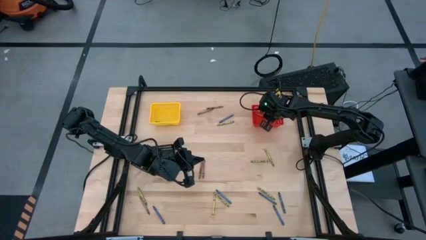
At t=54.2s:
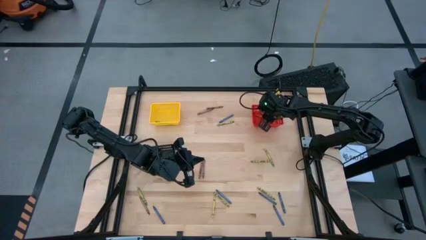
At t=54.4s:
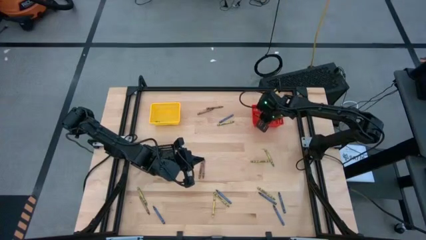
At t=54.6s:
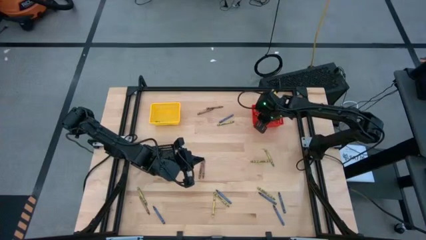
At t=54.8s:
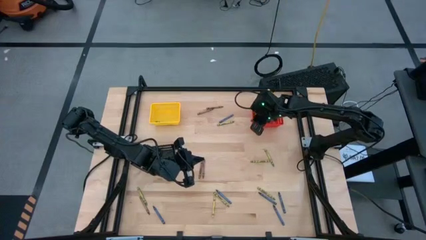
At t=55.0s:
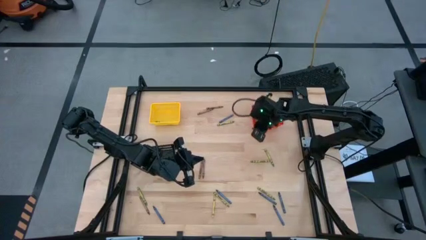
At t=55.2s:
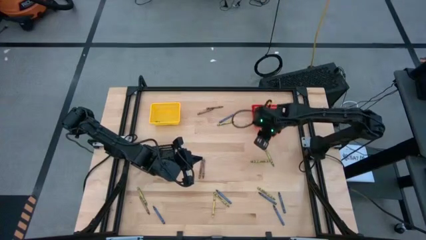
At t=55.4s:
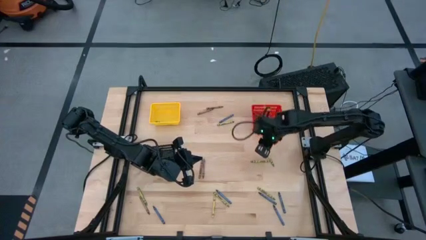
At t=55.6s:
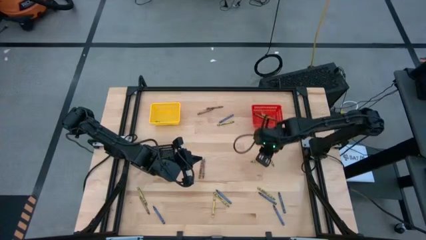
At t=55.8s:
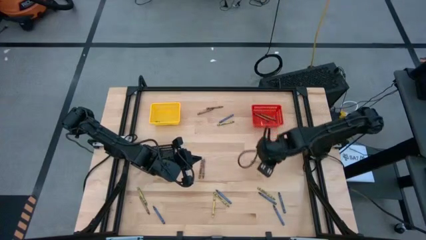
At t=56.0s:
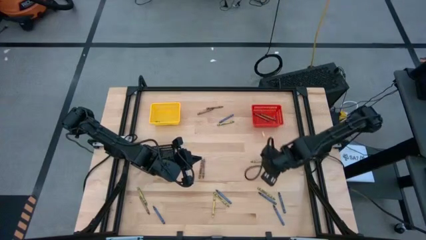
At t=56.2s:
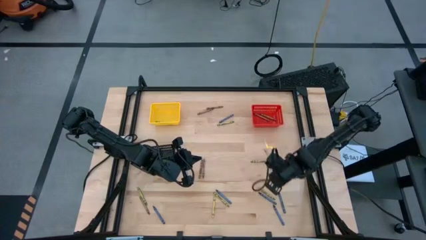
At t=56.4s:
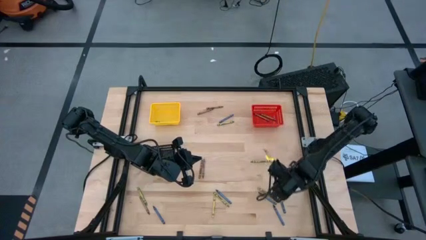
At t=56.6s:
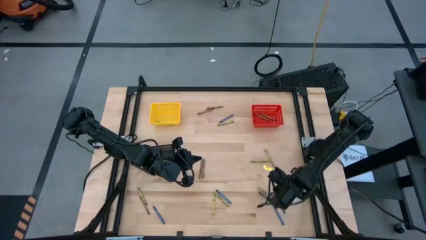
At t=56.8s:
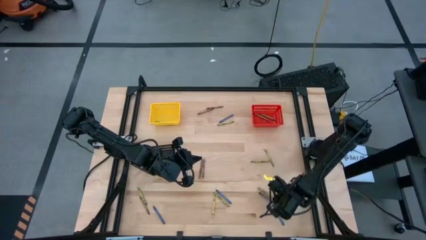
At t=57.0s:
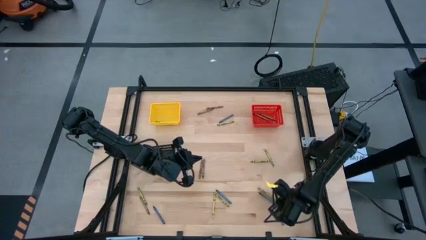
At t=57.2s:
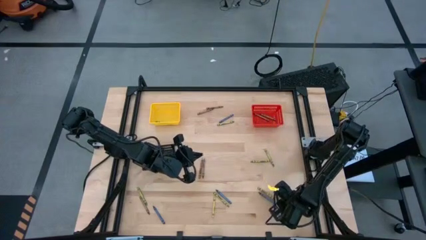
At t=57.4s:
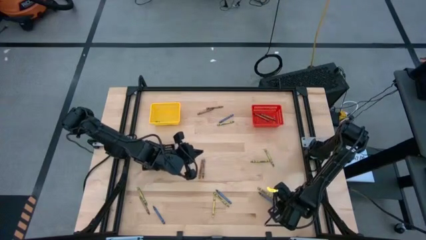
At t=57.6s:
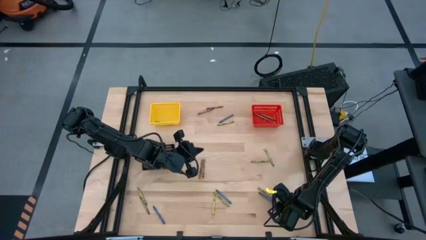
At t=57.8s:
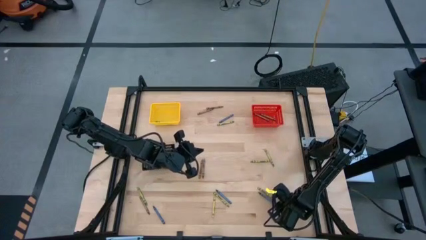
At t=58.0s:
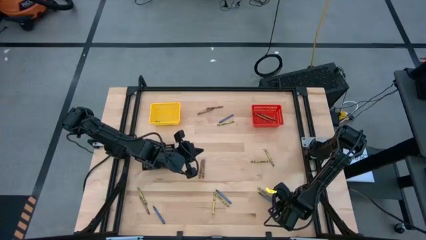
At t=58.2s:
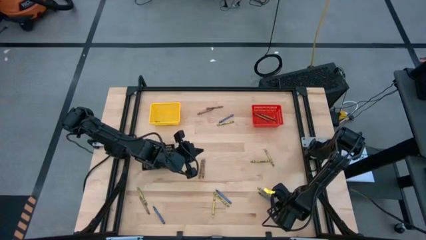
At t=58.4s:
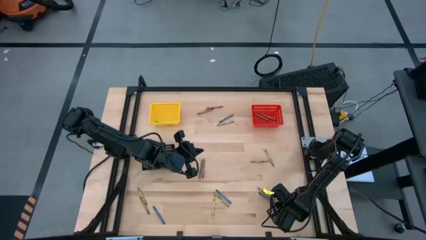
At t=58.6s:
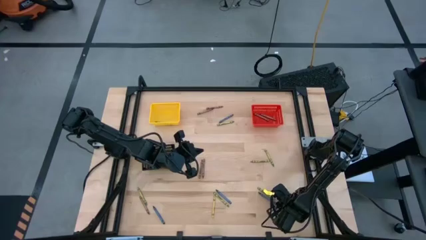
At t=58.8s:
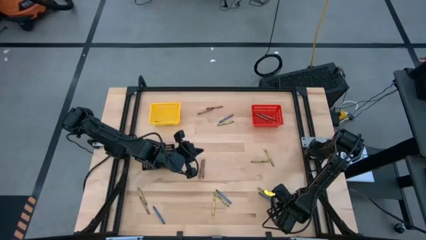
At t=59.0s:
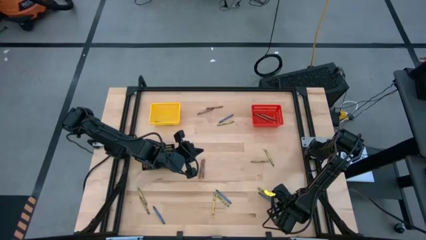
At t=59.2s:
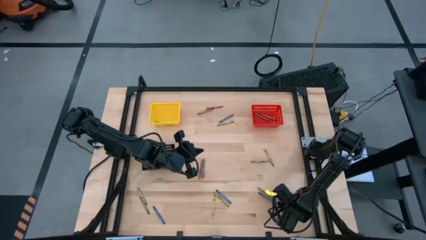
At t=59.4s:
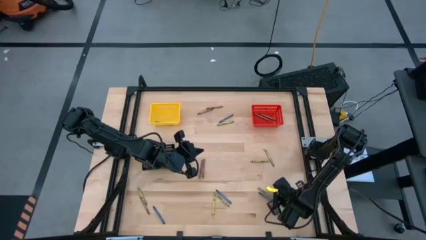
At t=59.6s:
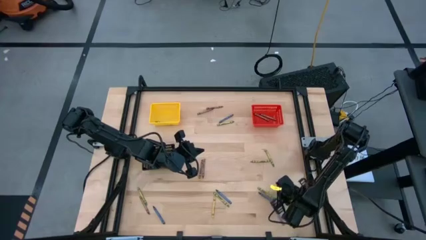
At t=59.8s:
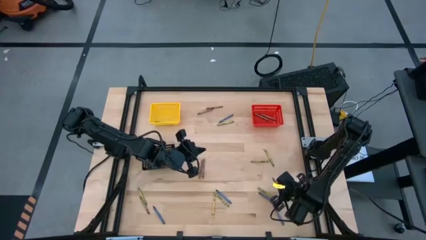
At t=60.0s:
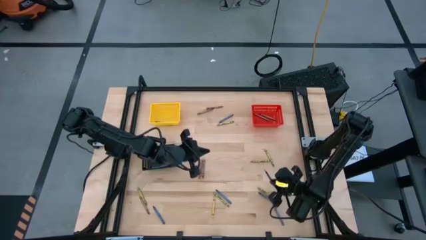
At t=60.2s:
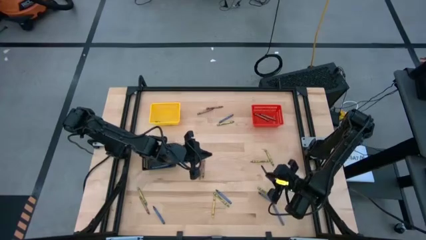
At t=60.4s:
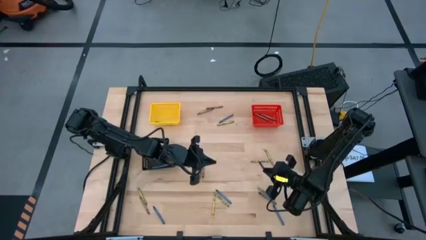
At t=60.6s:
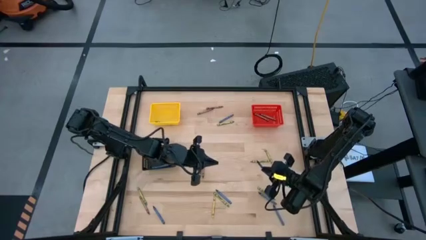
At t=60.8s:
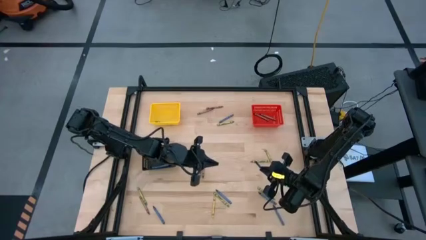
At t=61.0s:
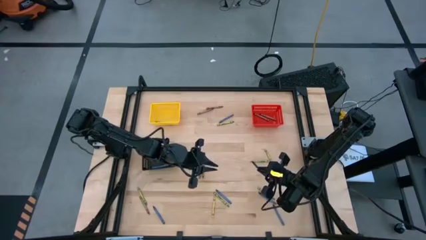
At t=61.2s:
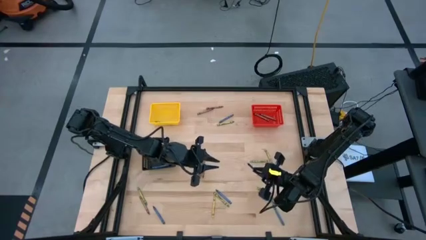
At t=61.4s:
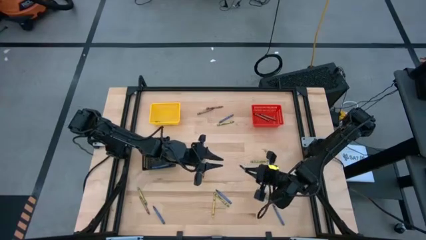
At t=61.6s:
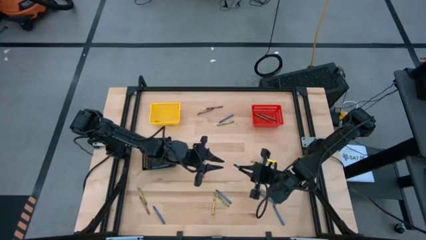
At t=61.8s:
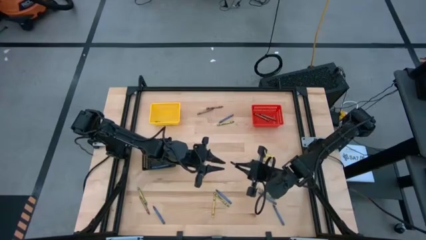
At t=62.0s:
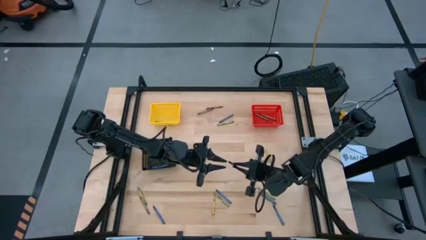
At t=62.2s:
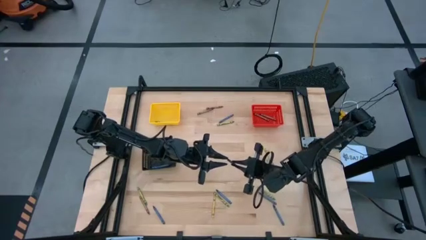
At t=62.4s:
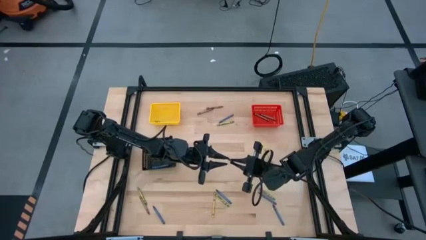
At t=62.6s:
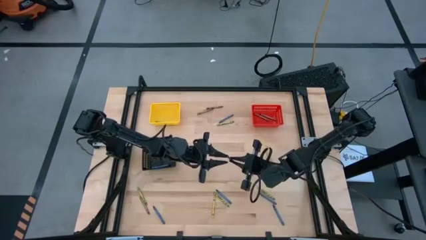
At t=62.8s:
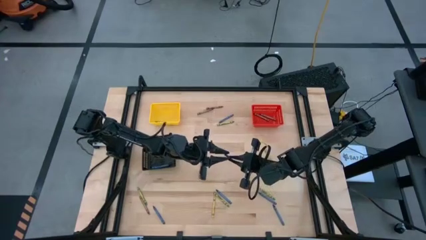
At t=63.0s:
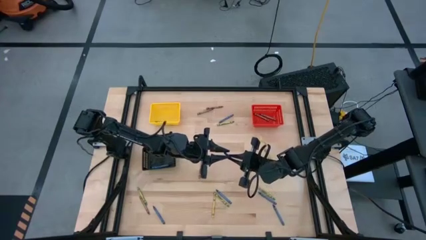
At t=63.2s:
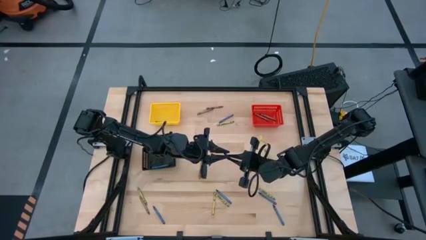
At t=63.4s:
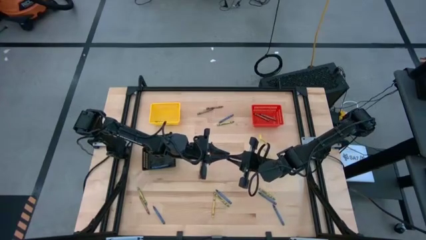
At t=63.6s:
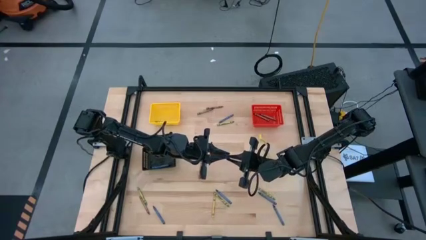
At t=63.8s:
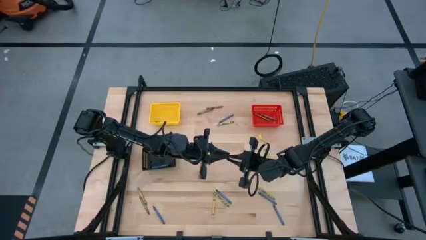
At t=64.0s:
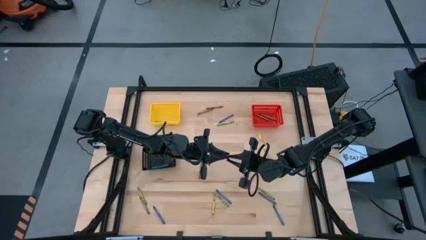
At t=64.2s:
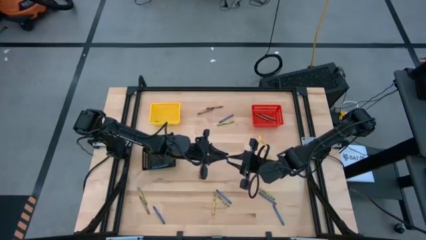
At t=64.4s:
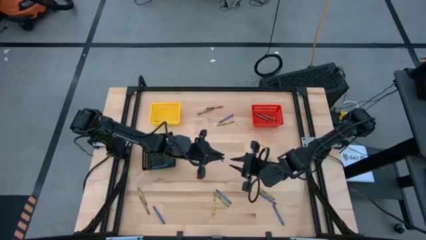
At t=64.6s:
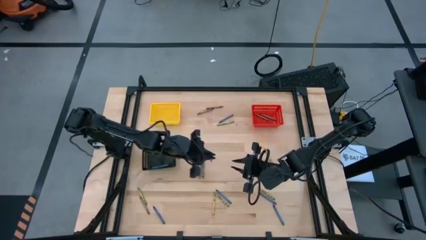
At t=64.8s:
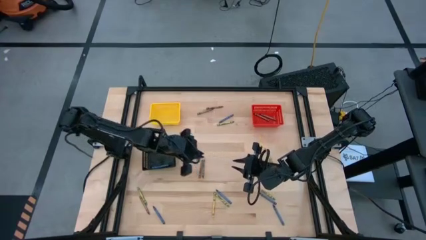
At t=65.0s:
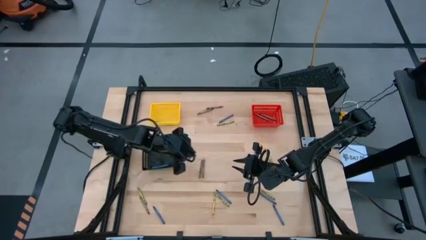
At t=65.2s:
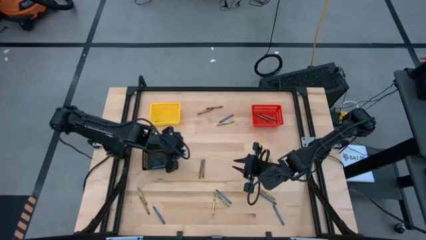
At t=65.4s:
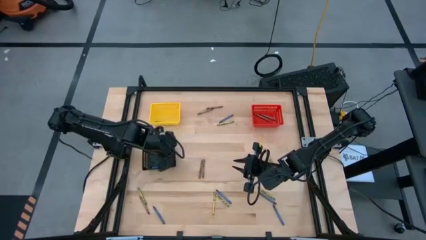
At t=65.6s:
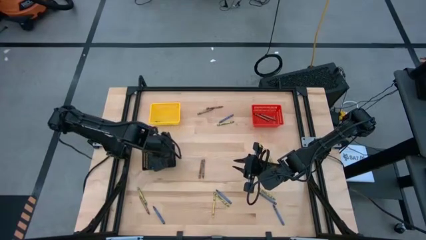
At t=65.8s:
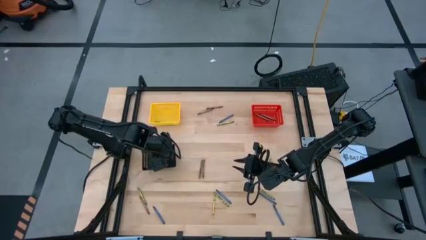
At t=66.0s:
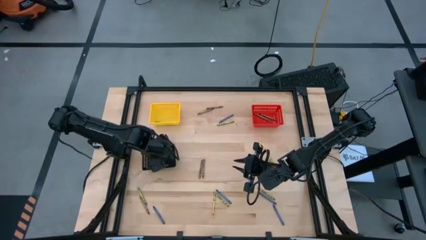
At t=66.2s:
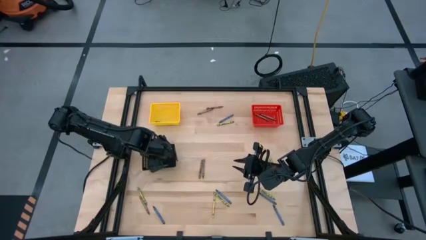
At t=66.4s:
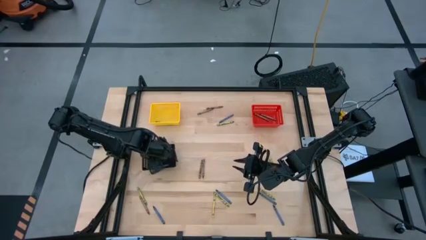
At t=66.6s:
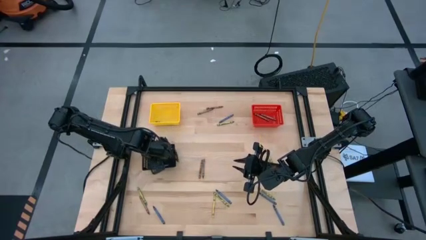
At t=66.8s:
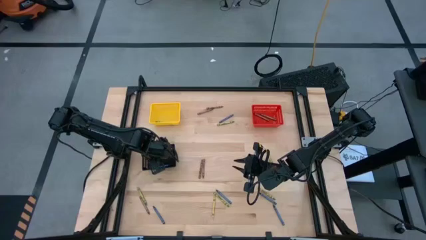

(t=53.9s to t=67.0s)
Task: Sort crayons
Put the blue crayon into the black bin
